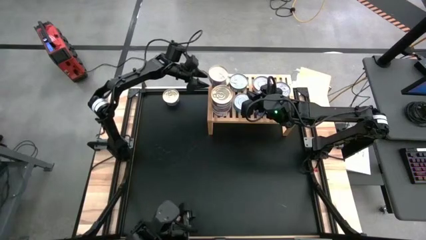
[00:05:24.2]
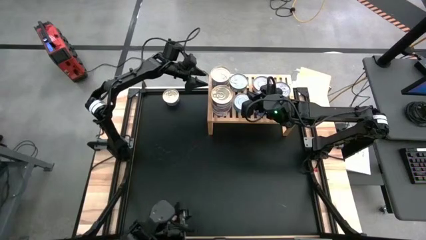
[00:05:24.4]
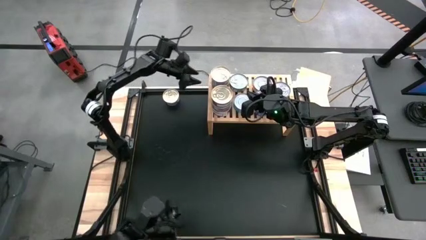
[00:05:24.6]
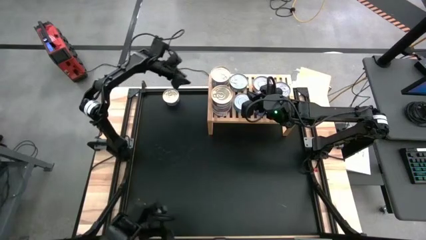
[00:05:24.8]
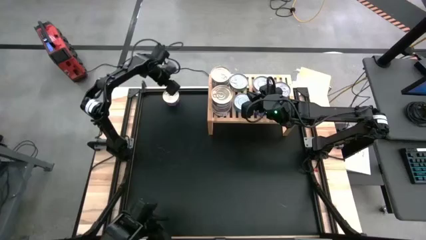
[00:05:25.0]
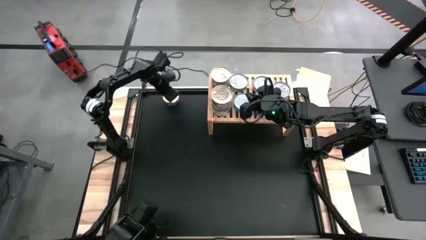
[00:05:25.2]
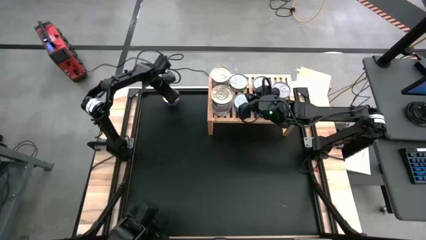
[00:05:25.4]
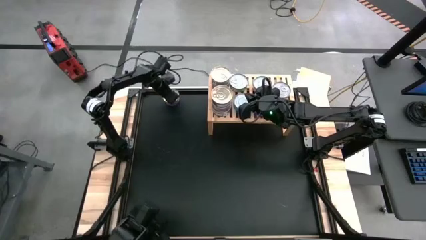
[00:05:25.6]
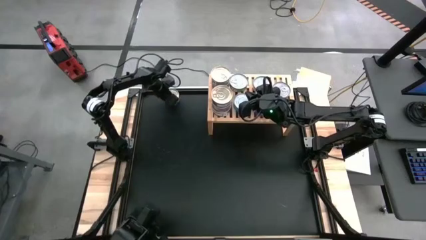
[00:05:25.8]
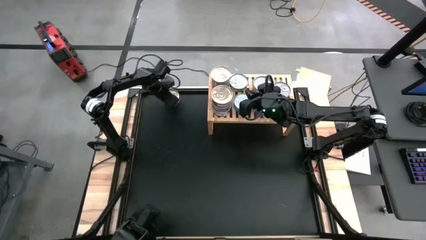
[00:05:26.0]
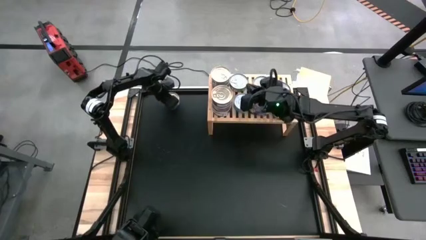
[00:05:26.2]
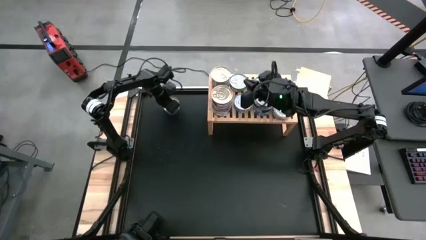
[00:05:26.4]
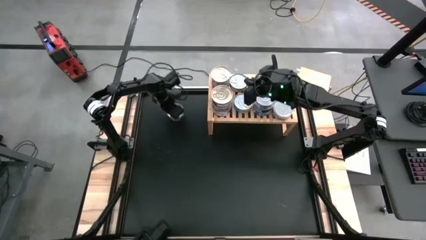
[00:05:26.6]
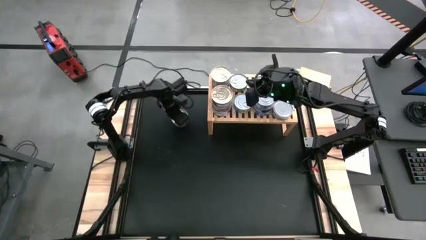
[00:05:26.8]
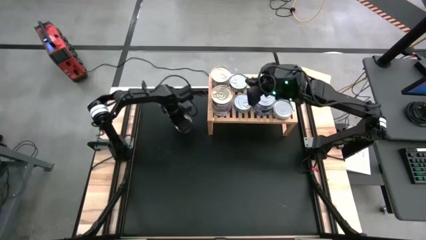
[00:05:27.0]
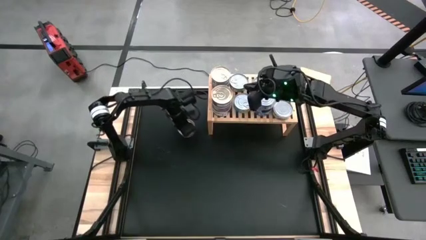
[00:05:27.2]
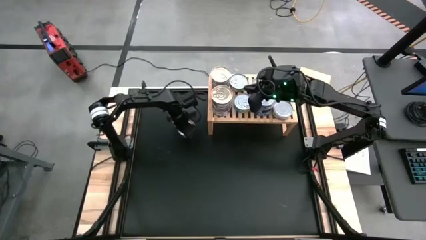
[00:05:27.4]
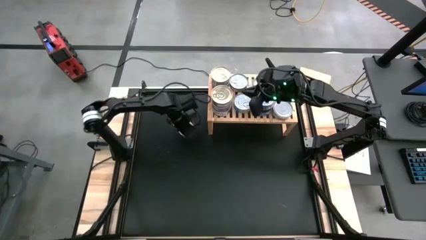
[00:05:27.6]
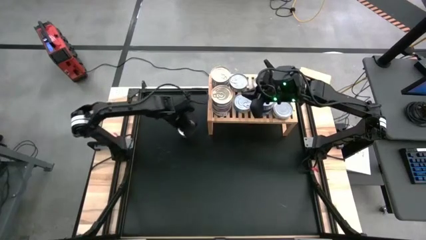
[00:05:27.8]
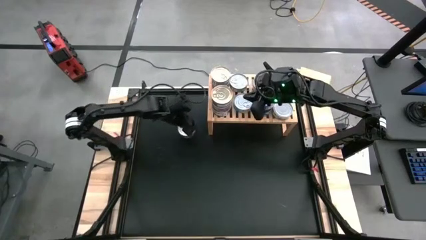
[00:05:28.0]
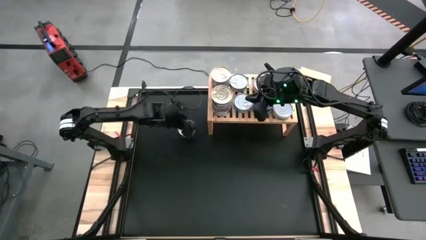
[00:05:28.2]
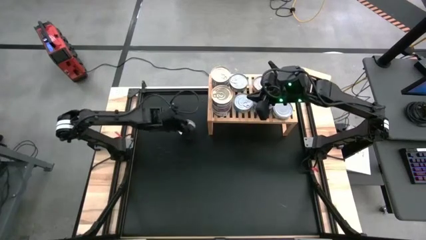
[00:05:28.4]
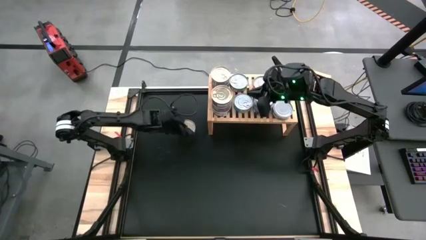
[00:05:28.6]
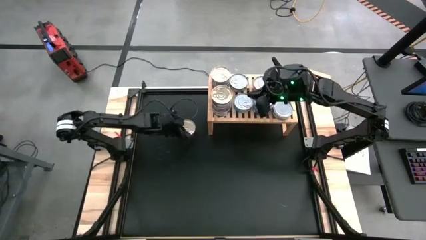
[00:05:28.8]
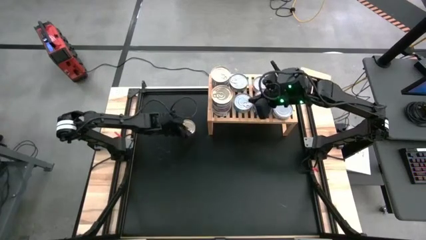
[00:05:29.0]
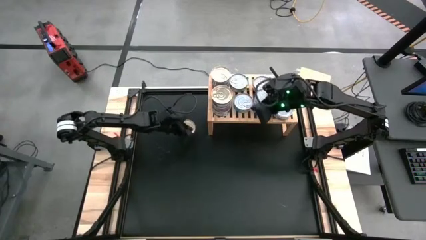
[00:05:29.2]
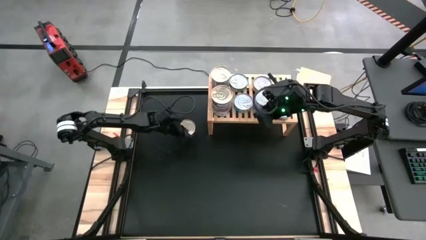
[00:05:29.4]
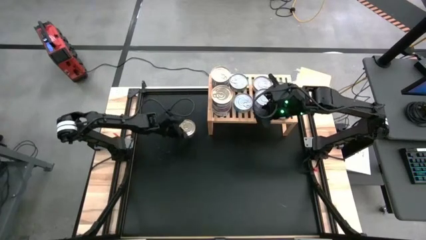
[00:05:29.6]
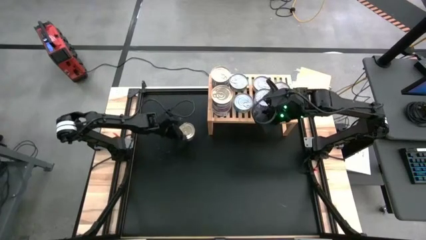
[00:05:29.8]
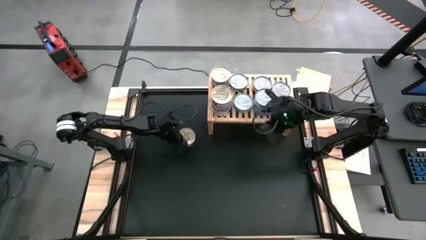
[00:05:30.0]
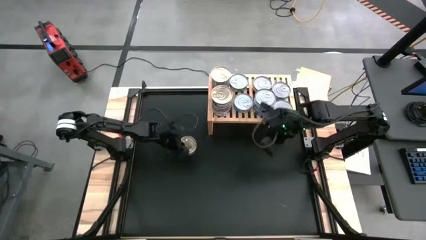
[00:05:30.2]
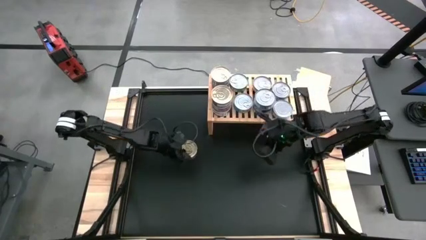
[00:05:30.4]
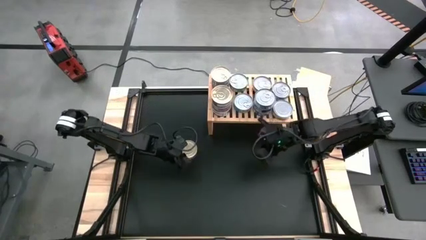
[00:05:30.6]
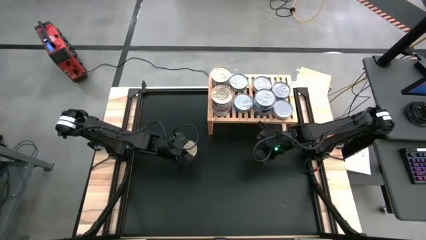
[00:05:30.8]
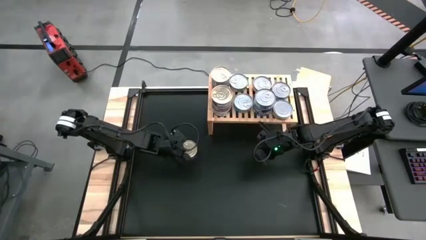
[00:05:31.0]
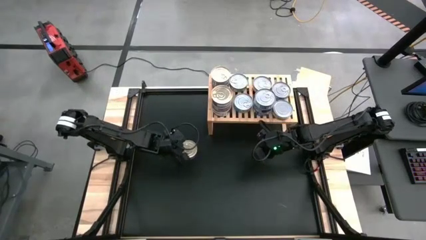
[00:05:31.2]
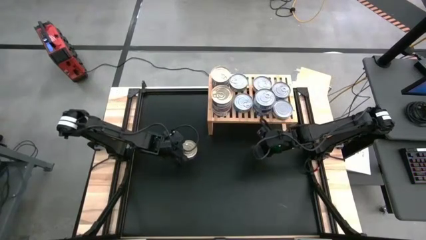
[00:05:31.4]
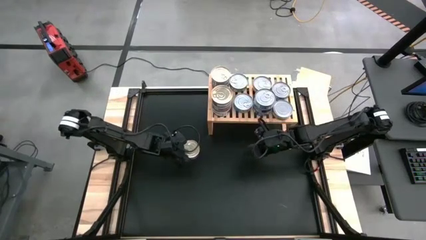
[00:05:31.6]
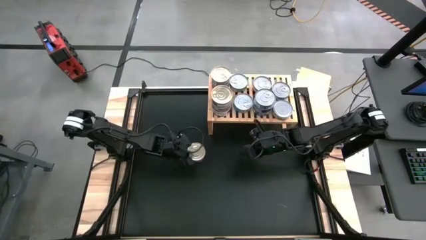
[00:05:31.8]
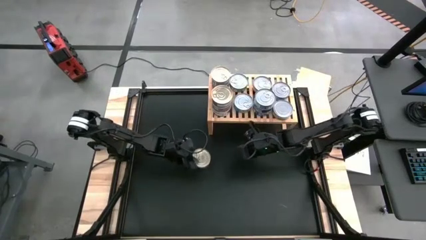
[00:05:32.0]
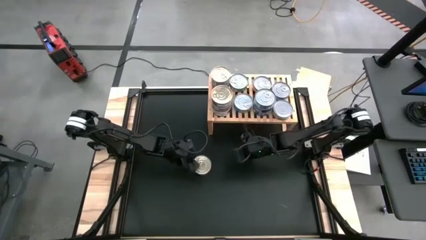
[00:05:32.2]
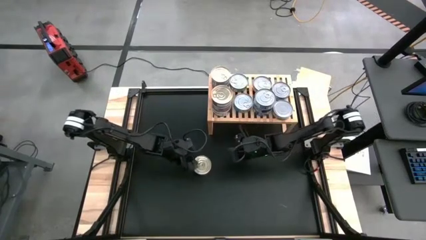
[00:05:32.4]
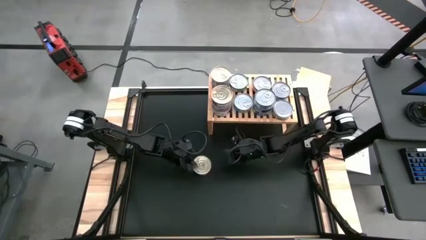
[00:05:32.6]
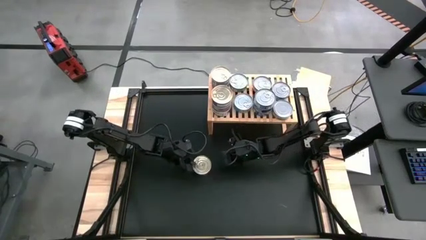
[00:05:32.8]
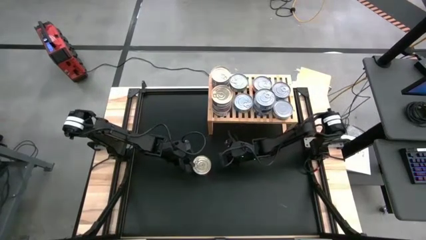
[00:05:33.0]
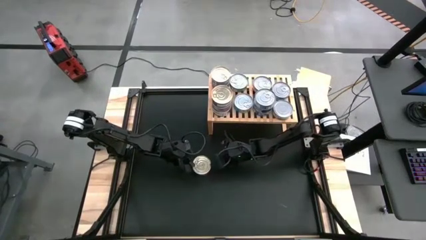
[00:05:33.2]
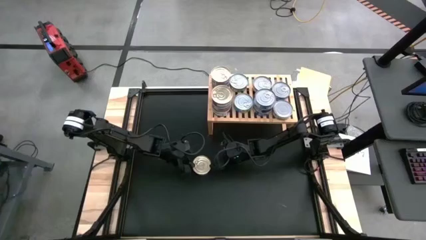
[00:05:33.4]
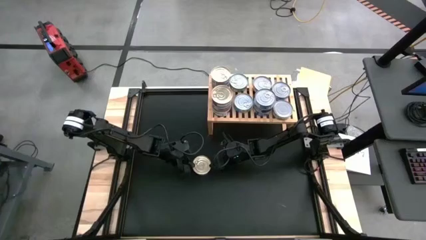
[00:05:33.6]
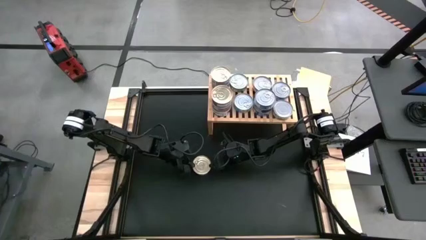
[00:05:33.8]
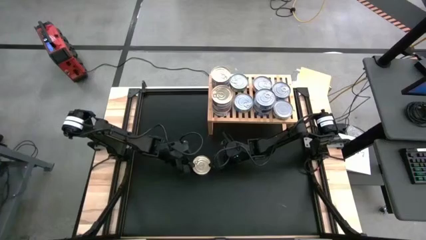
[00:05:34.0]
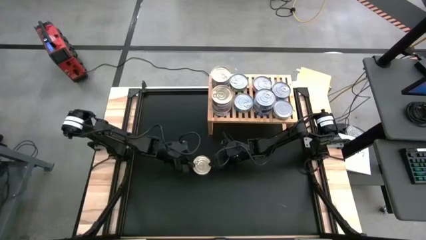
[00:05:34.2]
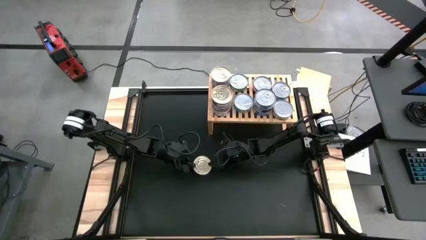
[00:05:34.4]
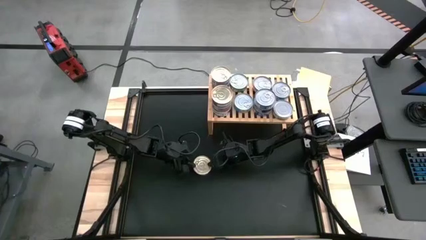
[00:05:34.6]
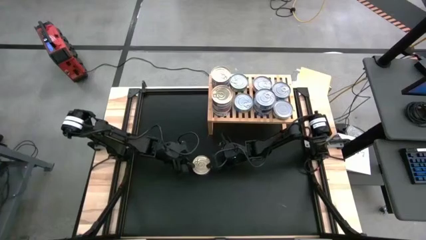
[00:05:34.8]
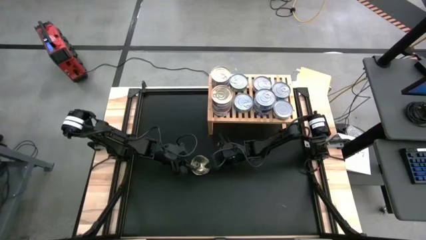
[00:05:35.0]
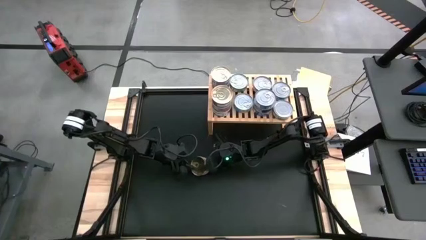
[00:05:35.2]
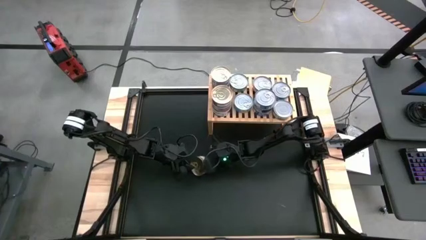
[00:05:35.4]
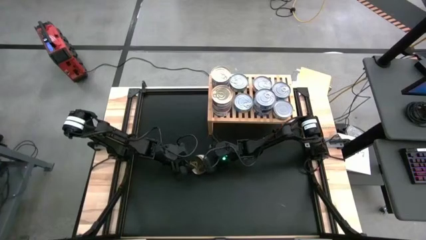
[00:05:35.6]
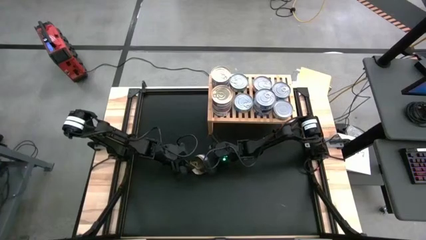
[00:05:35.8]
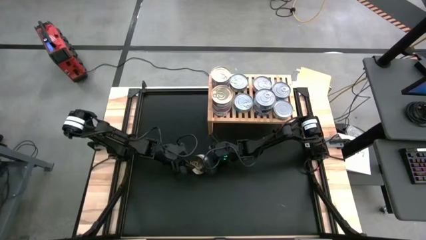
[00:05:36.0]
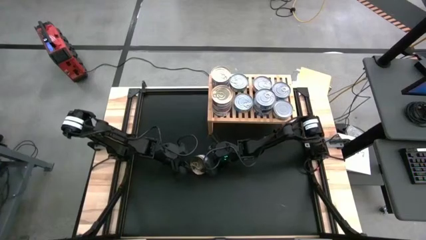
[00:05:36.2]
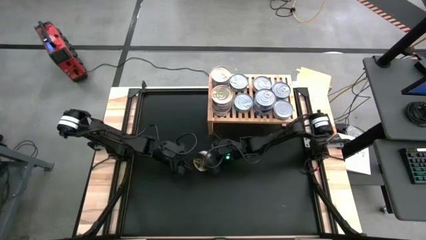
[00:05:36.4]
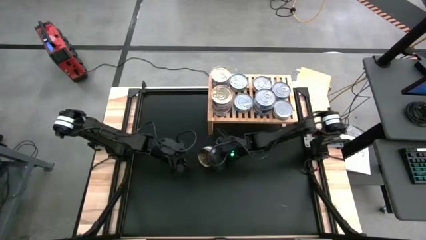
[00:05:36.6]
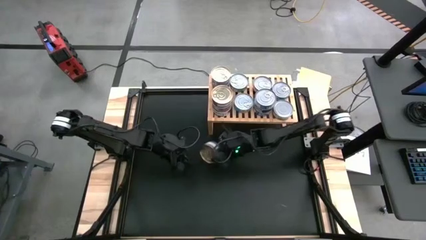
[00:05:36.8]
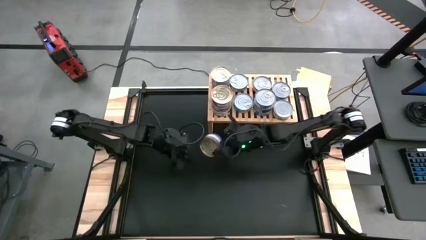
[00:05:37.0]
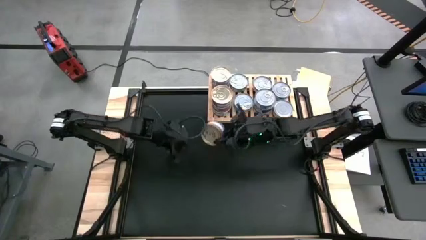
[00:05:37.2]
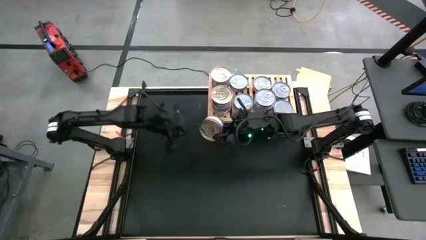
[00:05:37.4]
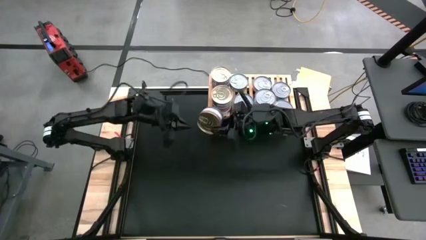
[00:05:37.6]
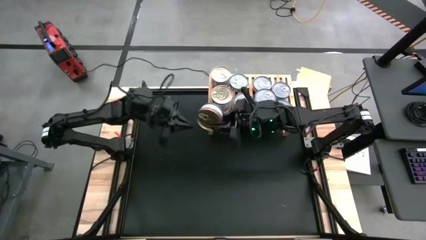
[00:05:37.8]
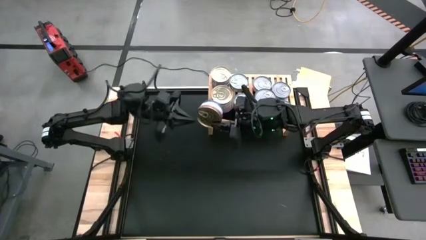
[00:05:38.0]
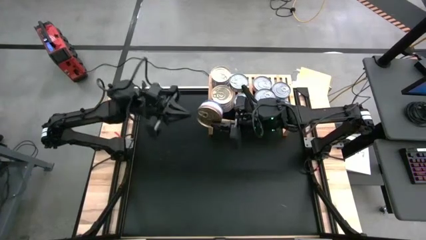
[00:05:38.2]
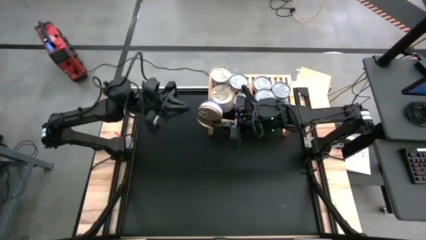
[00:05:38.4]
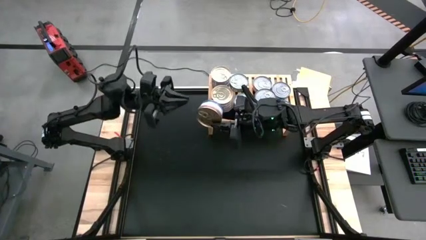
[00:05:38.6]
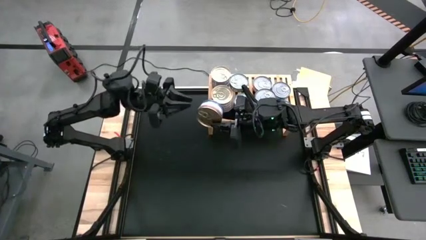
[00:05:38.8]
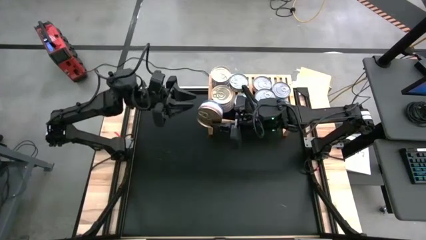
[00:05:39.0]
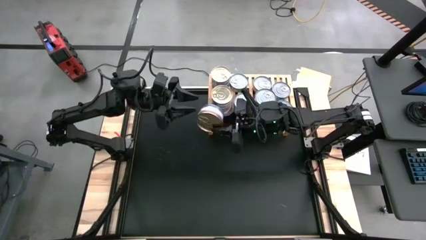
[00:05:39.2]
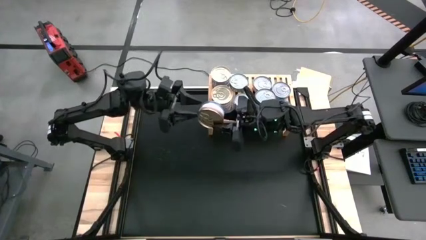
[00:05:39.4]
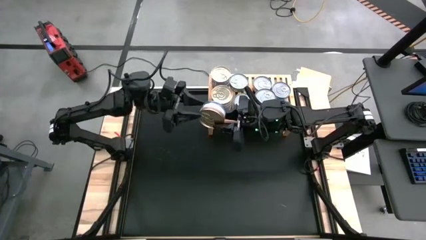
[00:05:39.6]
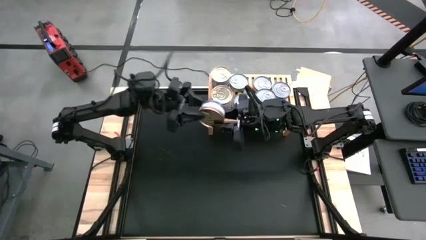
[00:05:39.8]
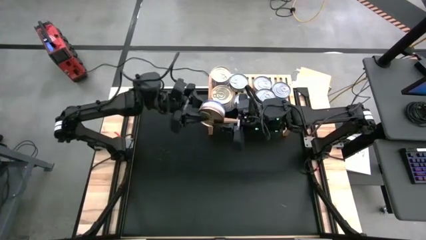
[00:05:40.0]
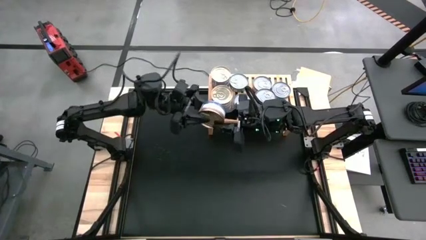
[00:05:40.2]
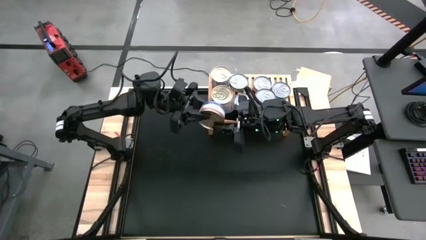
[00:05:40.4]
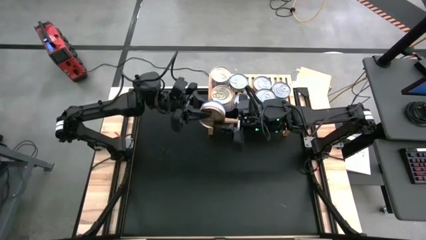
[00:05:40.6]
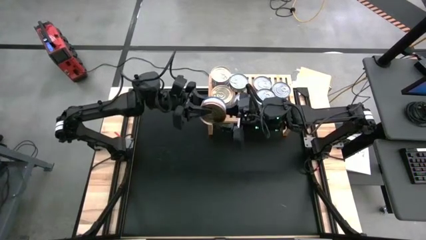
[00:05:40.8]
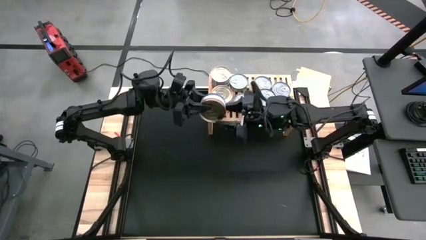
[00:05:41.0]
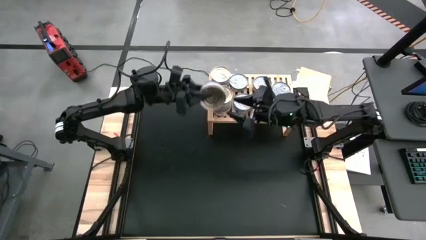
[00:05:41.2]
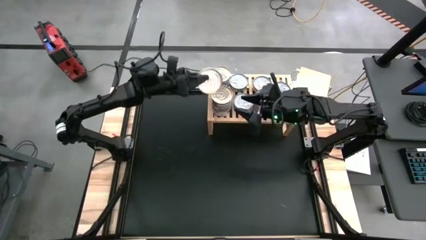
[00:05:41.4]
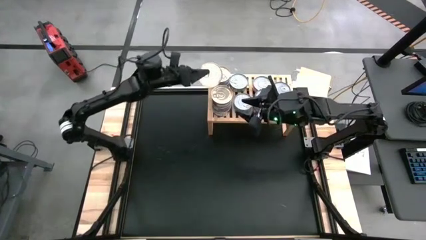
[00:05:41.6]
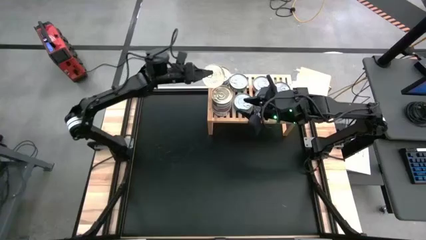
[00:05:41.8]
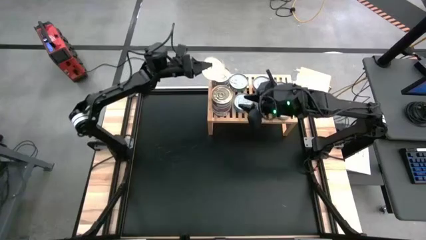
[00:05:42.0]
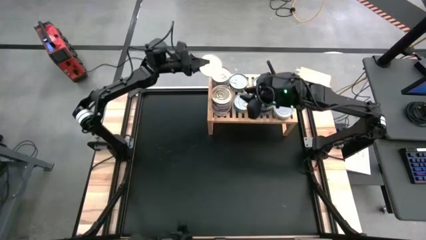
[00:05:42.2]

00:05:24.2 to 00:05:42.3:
Task: Stack canned seafood by type on shelf
Stack the blue-pink tuna can on top of the blue-pink tuna can on the shelf
